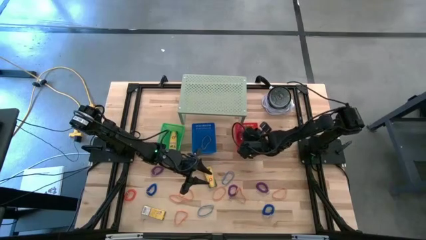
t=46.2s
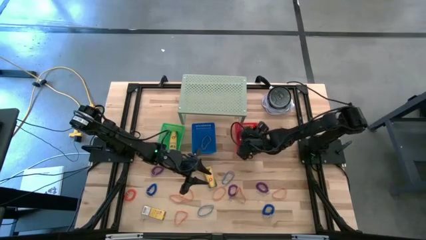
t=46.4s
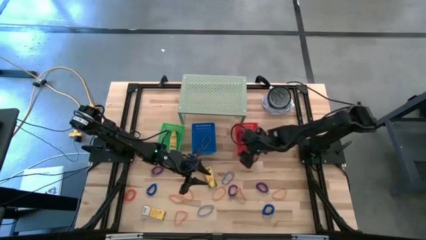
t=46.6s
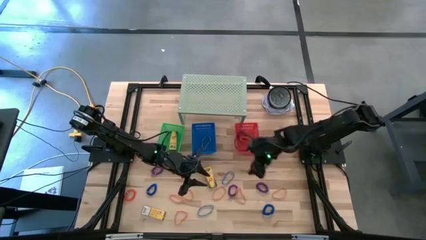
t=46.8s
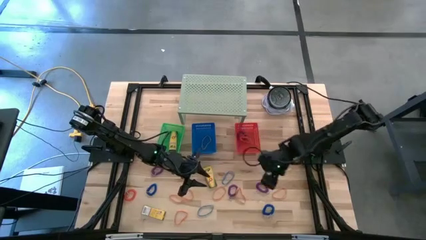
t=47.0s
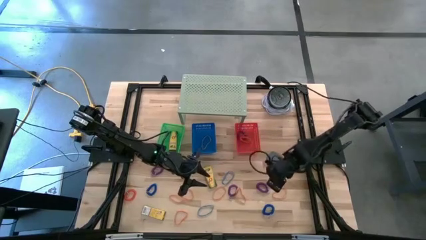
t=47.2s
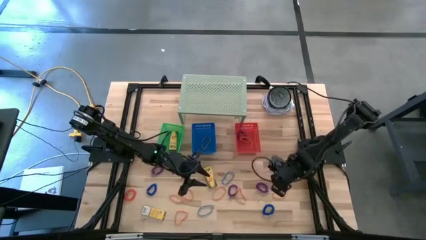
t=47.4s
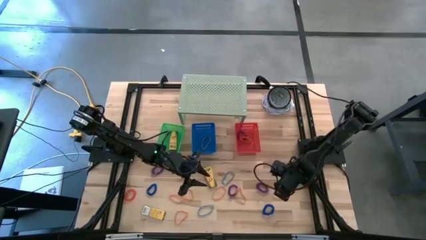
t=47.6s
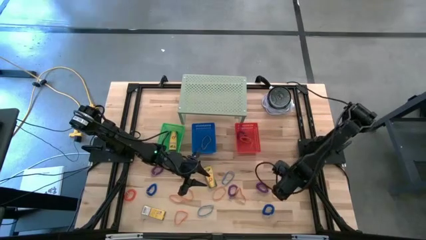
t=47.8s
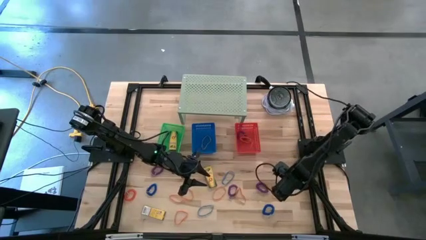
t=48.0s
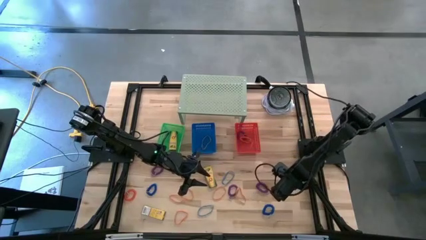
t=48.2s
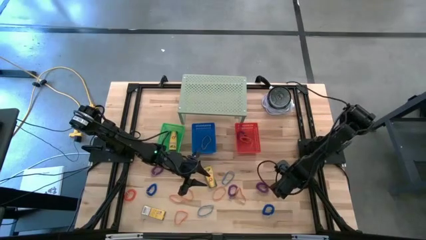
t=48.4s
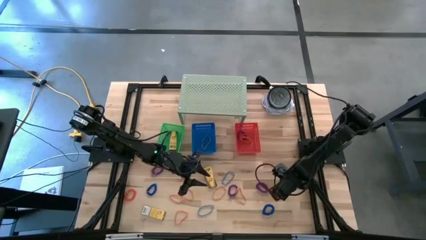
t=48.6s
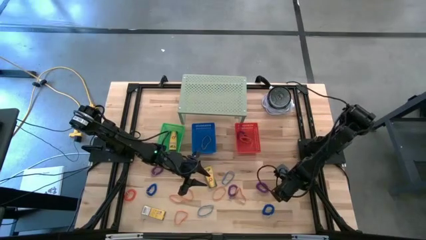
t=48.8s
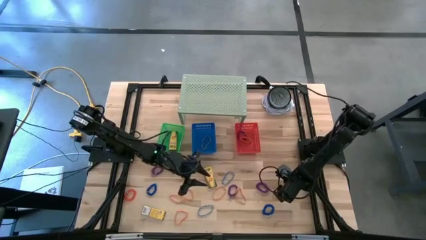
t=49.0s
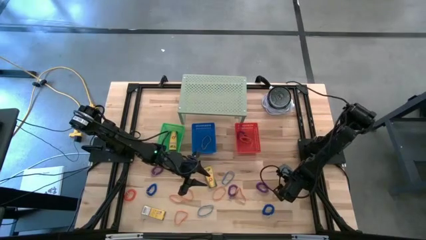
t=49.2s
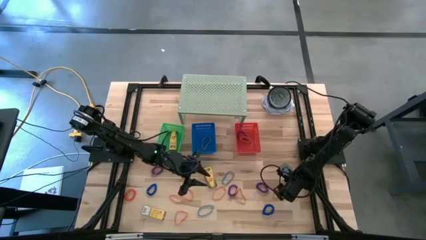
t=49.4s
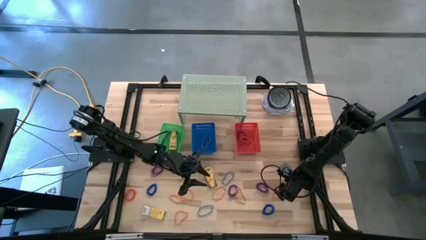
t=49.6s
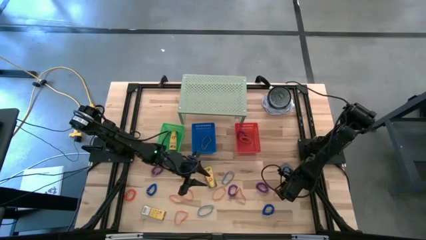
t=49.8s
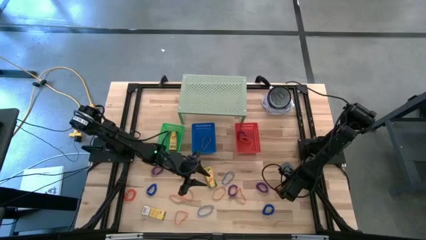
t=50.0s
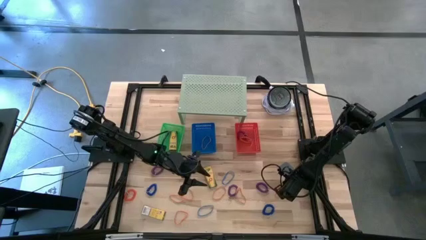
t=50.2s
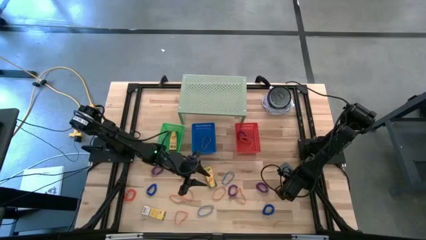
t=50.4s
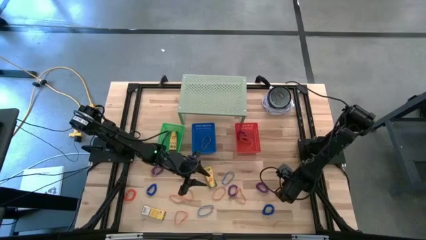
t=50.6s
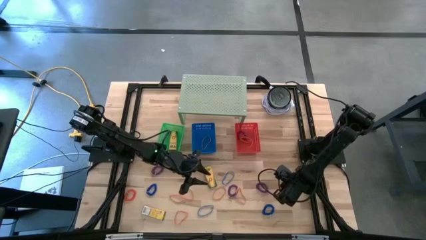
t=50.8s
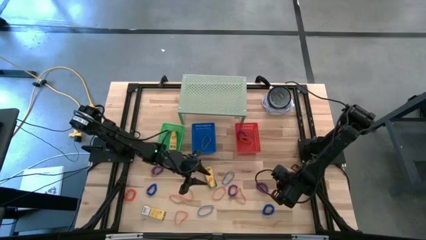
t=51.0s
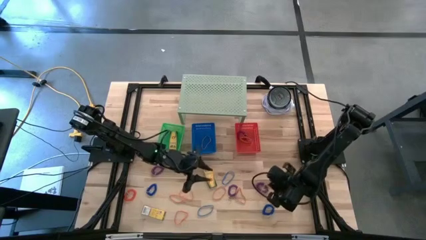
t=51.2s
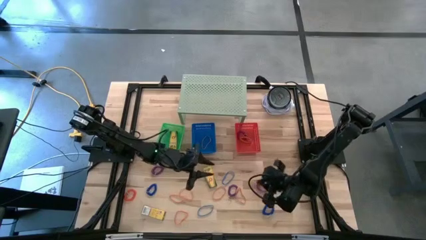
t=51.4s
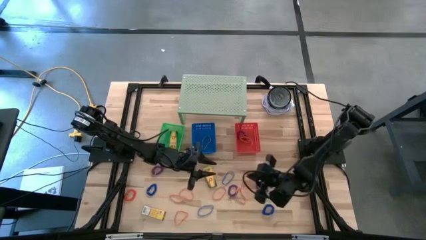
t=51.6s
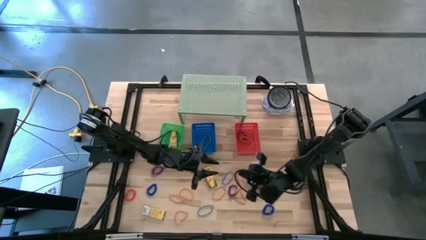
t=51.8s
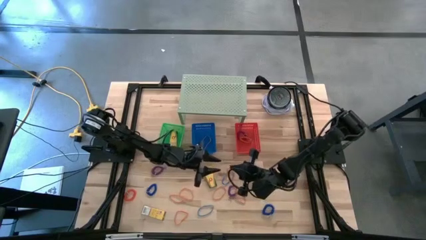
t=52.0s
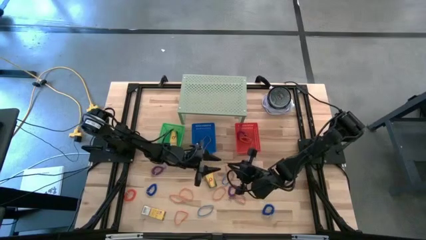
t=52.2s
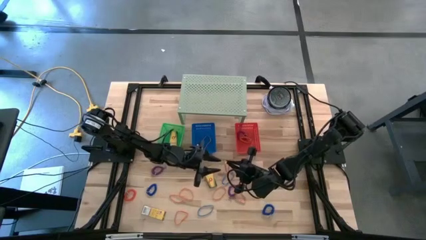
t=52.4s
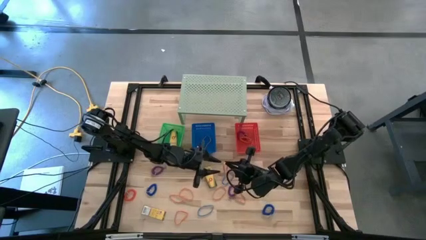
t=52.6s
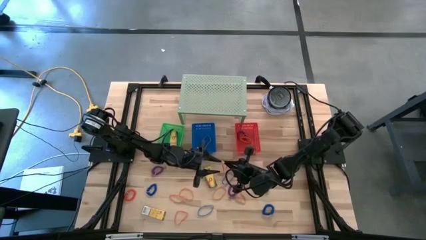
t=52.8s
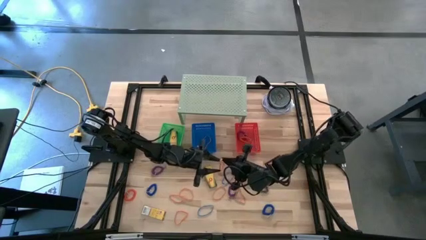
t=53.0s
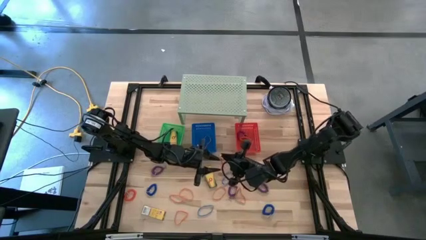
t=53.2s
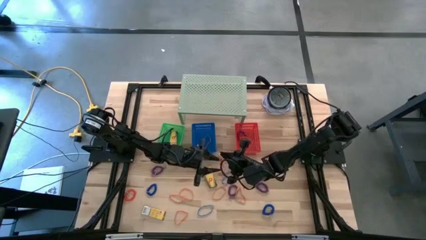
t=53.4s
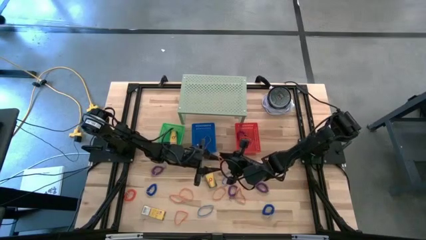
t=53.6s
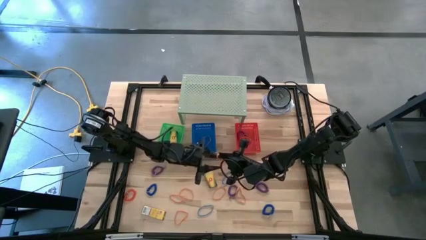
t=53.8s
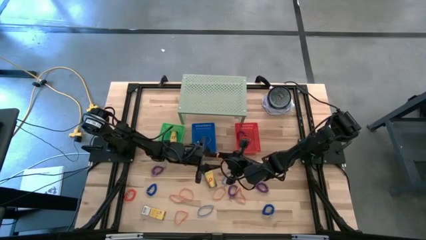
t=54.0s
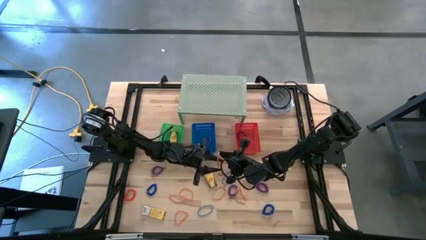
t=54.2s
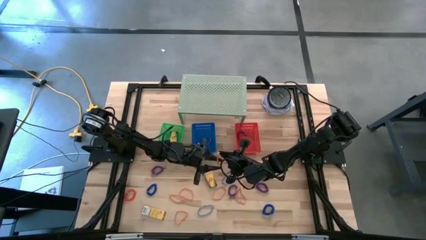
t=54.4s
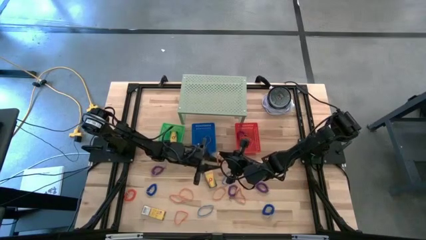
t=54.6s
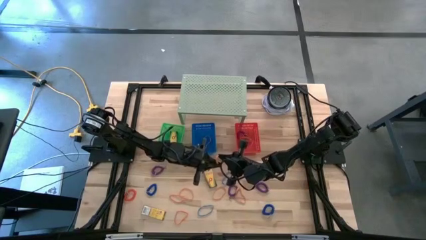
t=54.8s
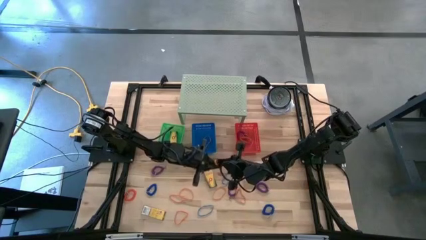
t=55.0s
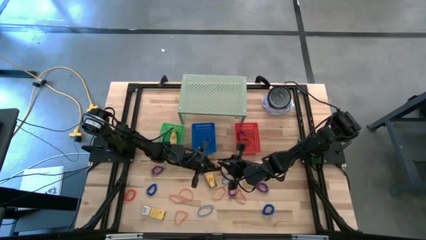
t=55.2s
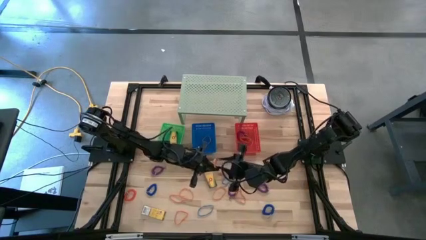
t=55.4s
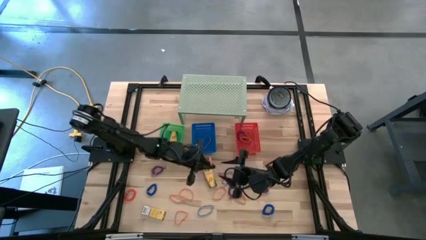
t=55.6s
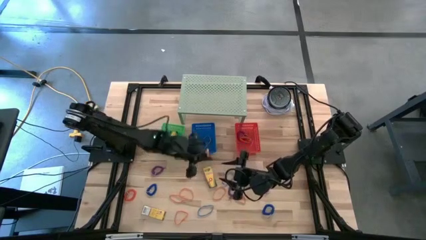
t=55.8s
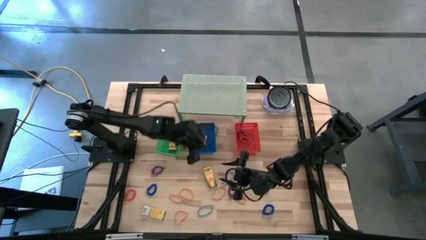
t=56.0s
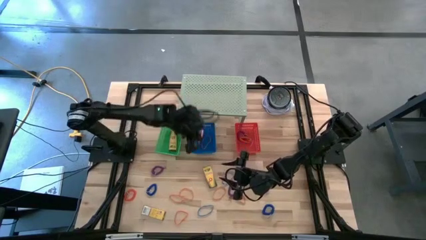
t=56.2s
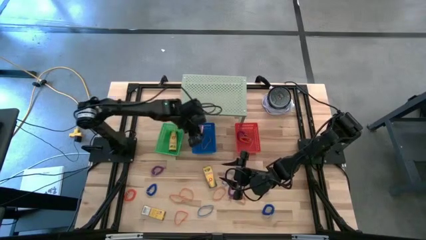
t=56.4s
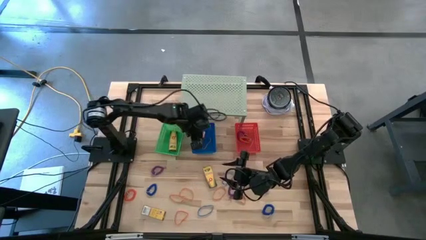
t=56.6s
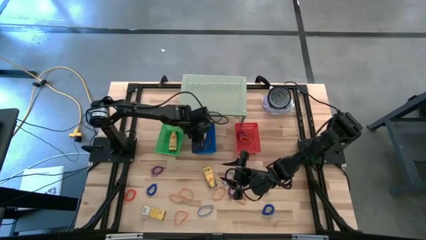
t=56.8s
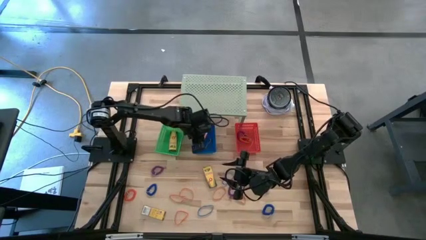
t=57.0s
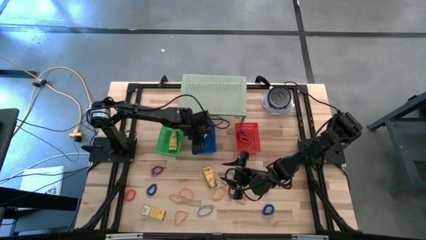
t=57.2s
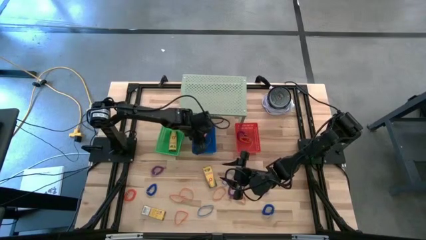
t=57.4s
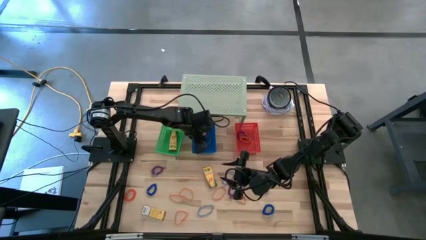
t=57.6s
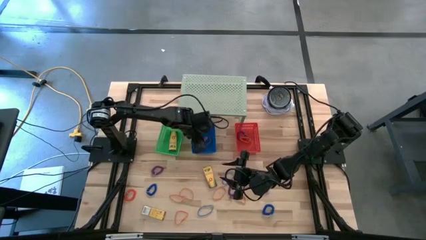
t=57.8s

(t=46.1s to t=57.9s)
Task: Pick & Place Office Desk Supplies
Put the orange rubber band into the blue bin

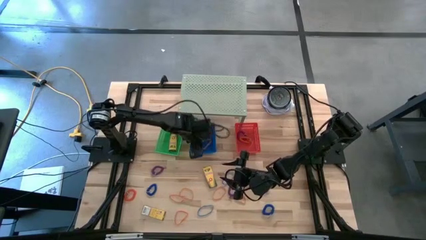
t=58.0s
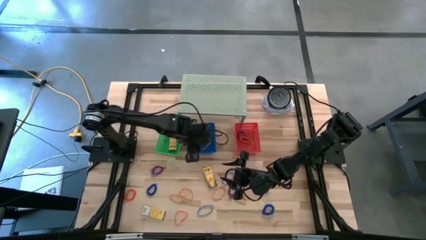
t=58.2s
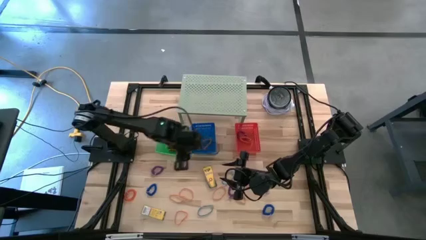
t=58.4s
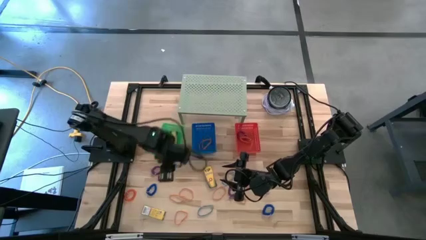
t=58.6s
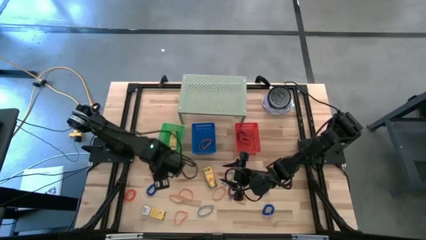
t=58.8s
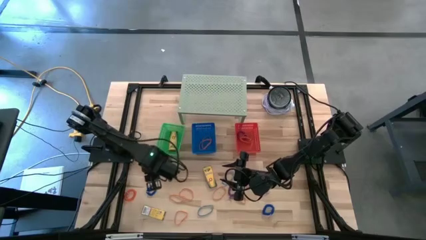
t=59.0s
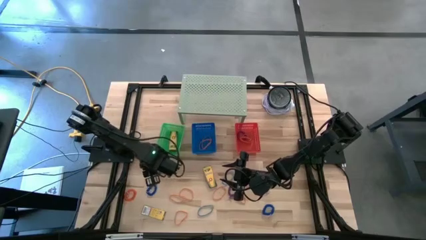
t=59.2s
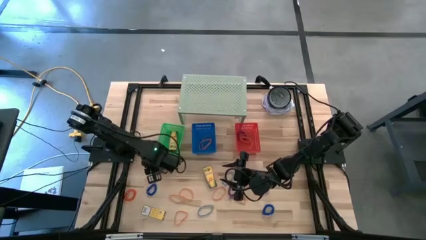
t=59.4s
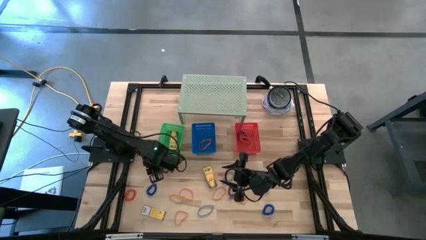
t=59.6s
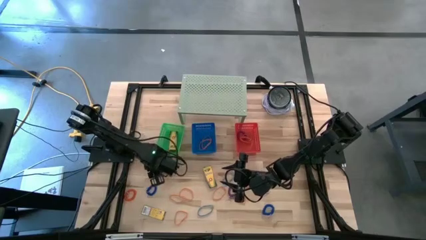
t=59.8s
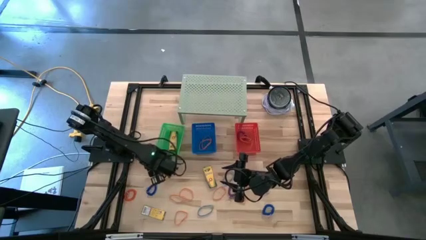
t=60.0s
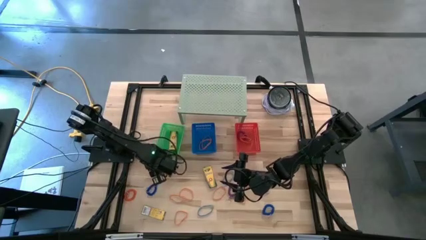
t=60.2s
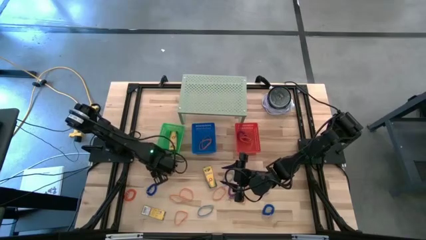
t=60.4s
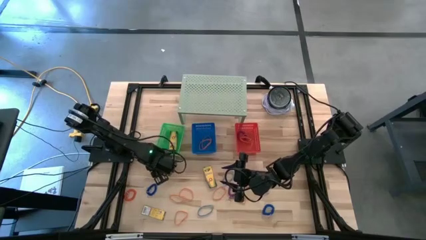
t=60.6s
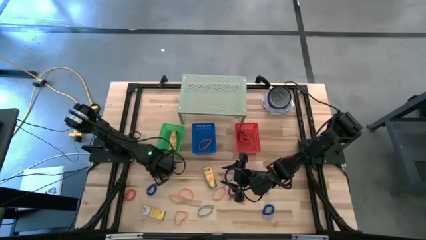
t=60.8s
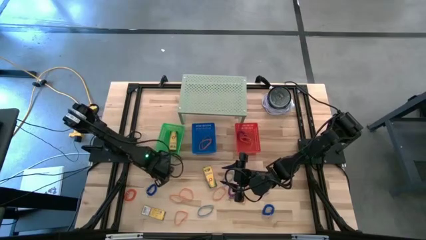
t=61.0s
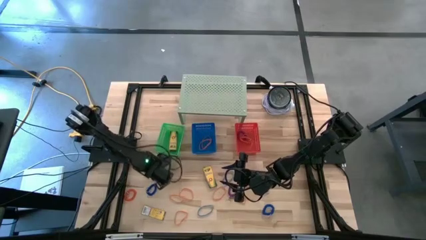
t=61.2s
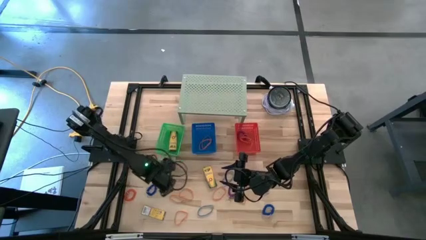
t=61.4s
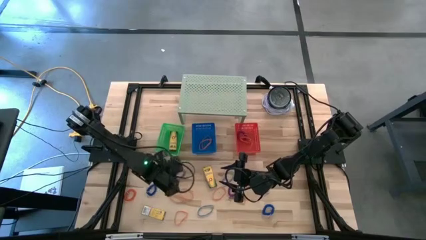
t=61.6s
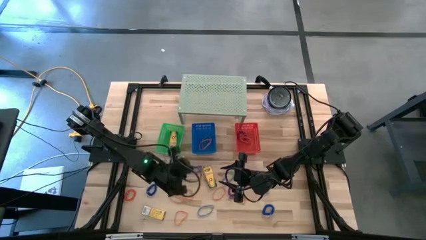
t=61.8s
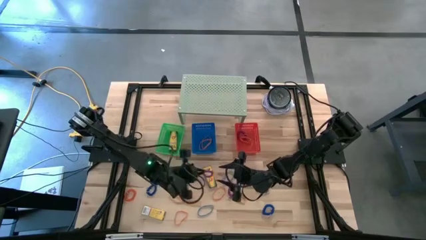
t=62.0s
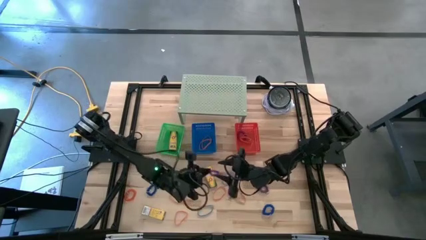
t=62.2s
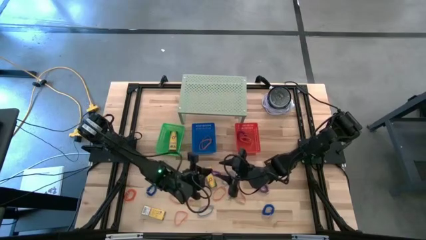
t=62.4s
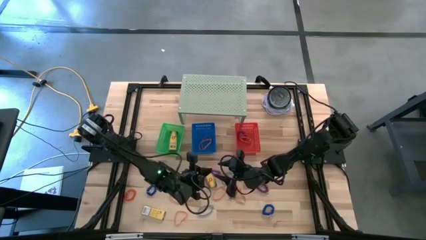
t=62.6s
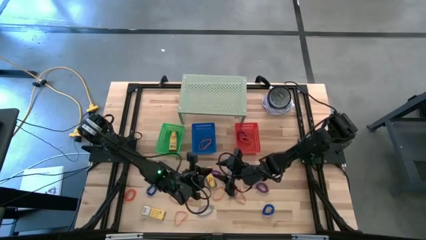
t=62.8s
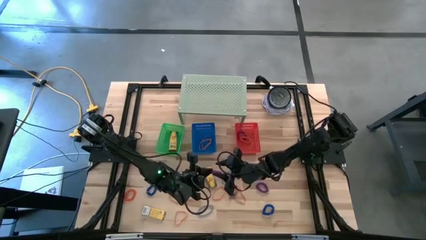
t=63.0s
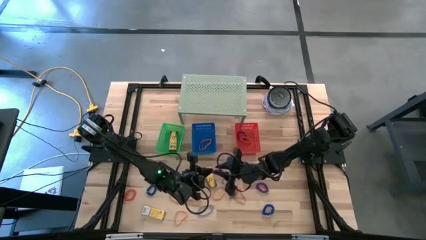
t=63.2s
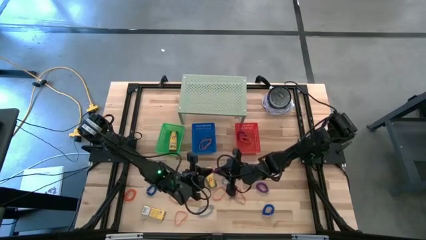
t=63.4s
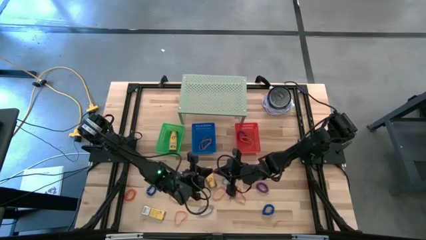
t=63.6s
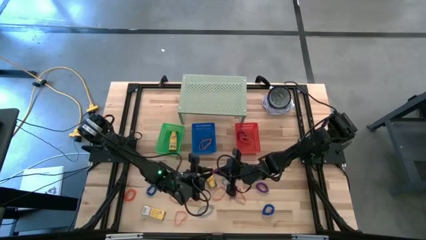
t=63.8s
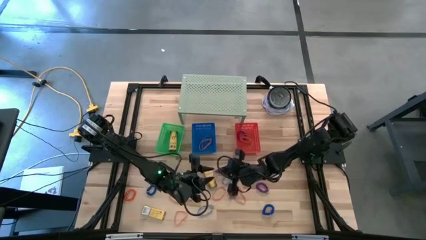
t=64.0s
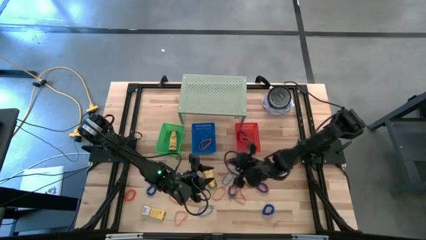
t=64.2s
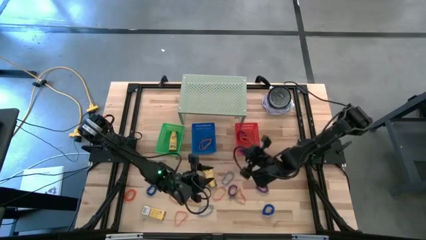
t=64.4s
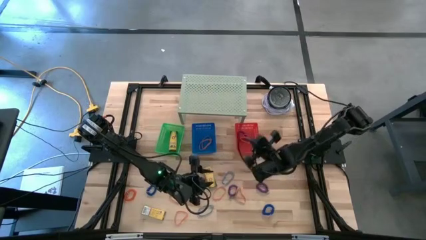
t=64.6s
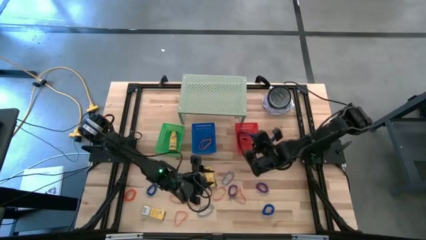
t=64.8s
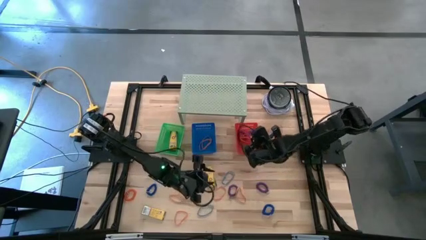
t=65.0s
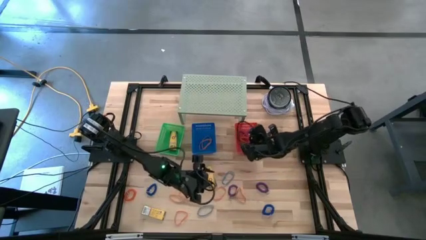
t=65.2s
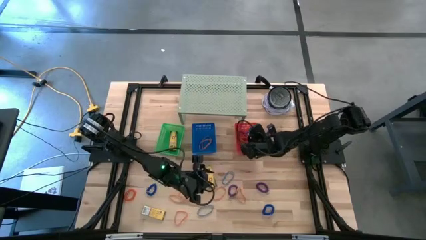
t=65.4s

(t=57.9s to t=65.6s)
Put the purple spring keychain into the red bin
